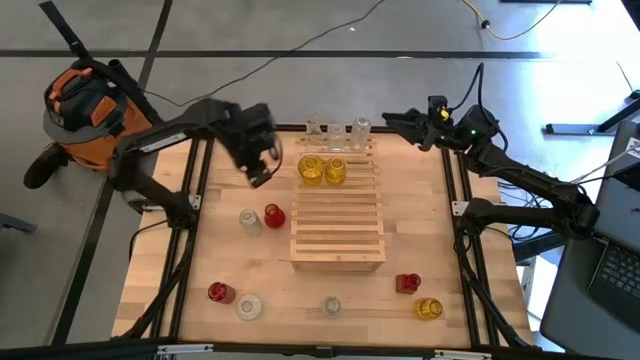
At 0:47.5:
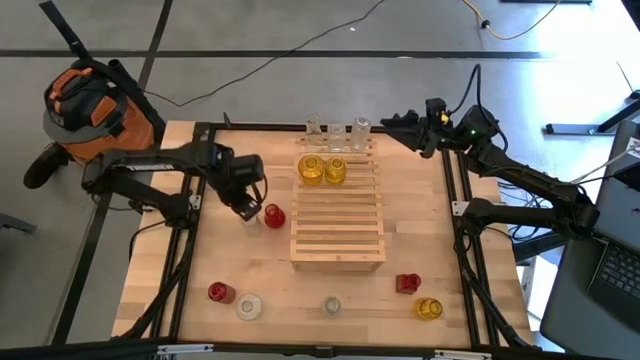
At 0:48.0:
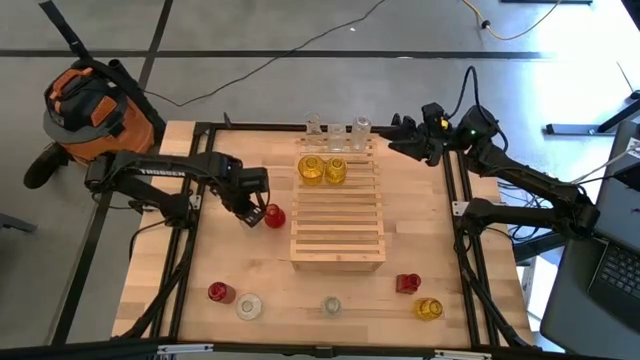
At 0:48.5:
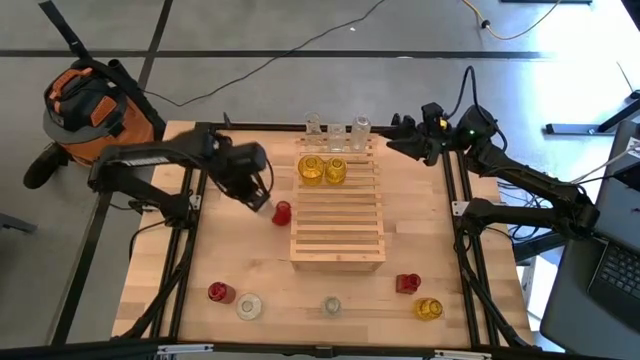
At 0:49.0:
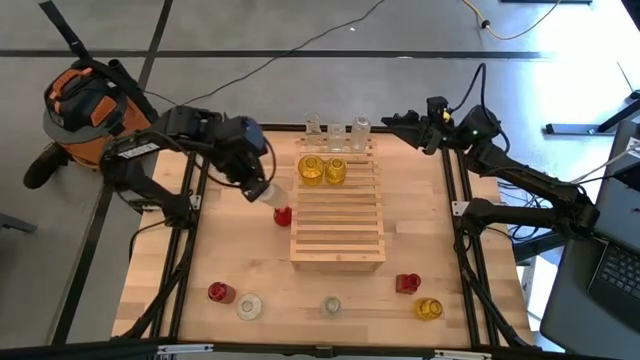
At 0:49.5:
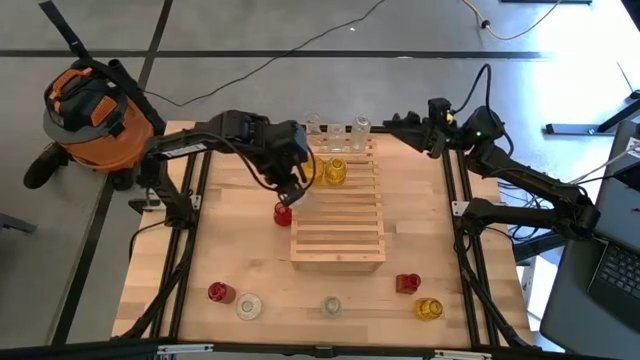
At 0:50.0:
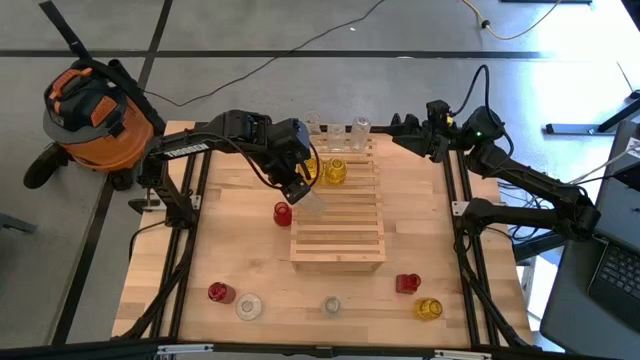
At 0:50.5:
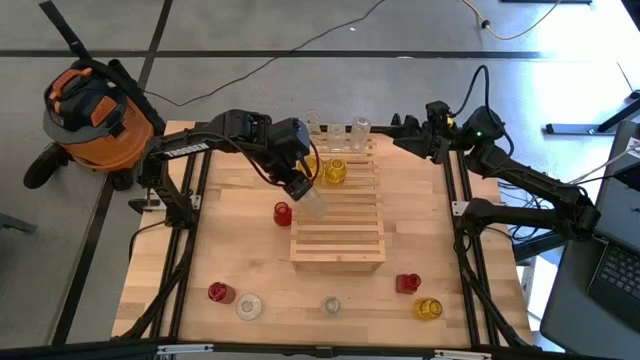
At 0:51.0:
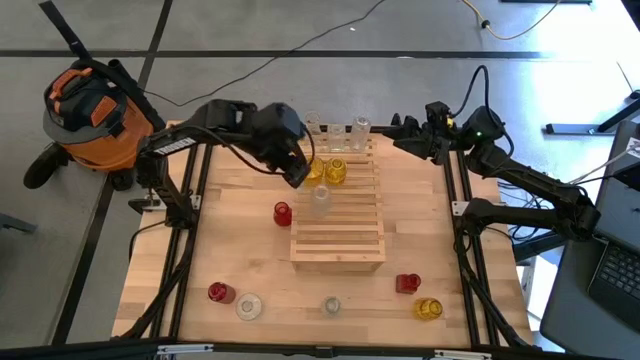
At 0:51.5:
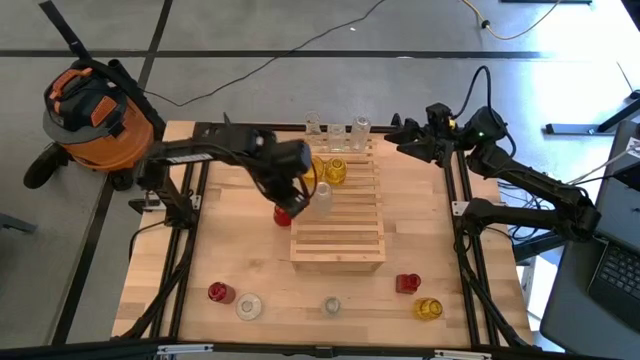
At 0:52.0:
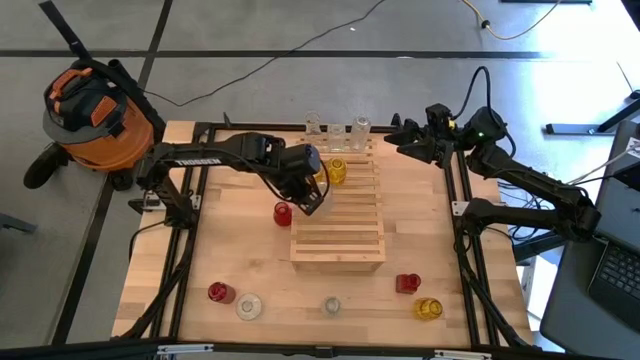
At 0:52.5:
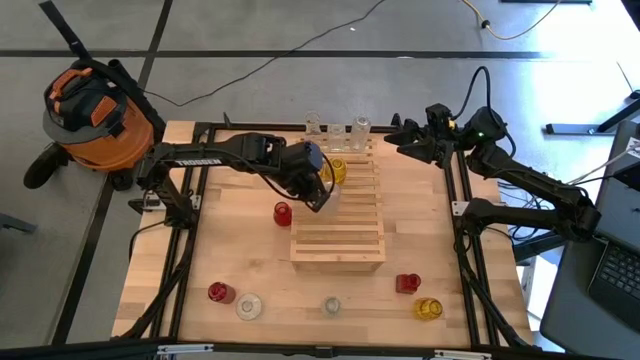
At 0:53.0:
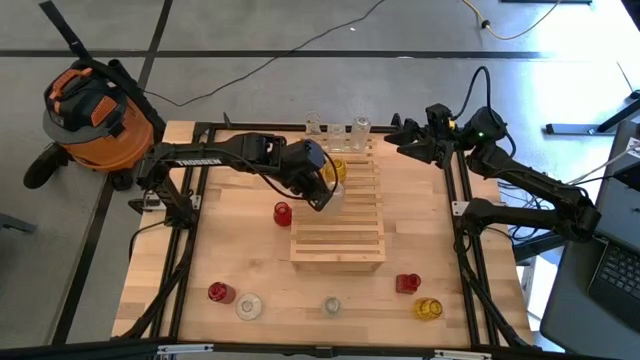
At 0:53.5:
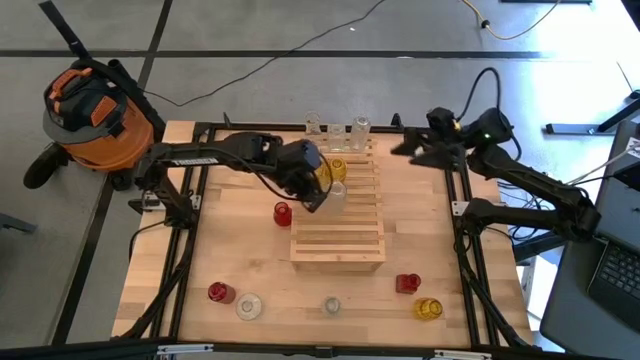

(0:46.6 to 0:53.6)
Task: sort vases onto shelf
Put the transparent vase on the shelf

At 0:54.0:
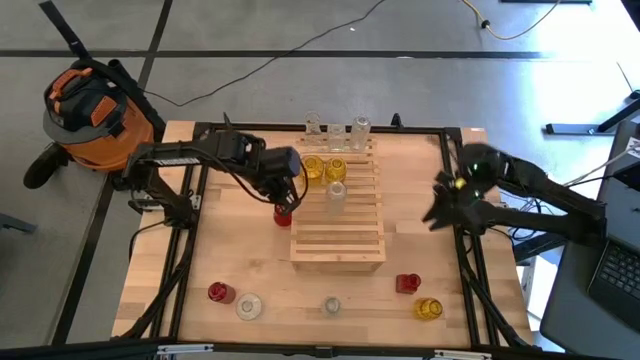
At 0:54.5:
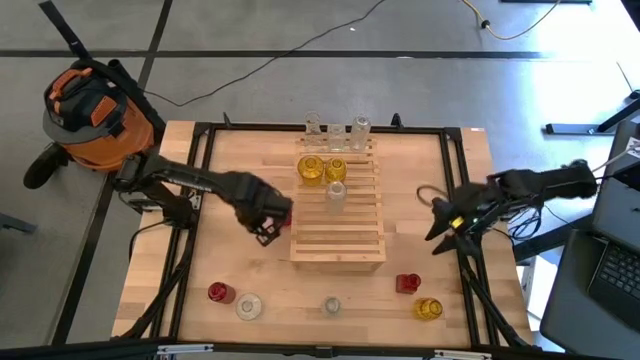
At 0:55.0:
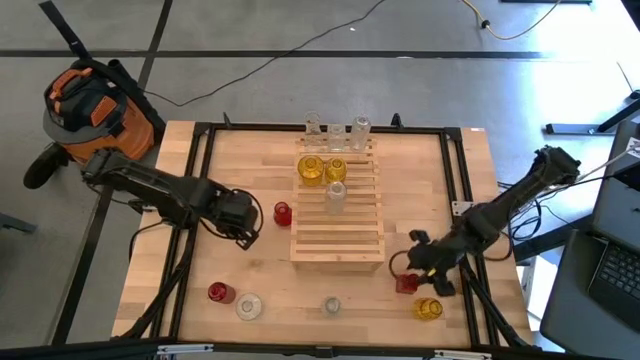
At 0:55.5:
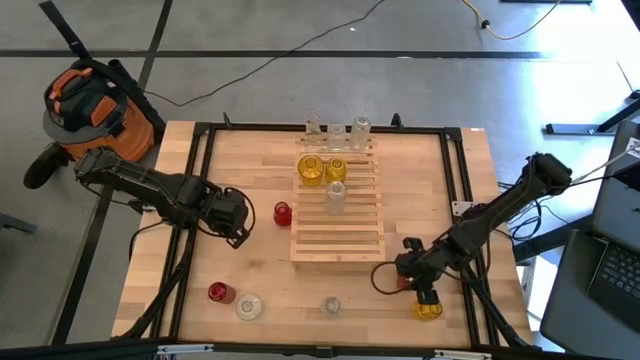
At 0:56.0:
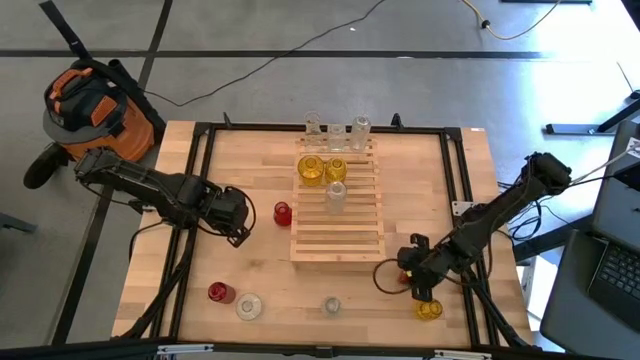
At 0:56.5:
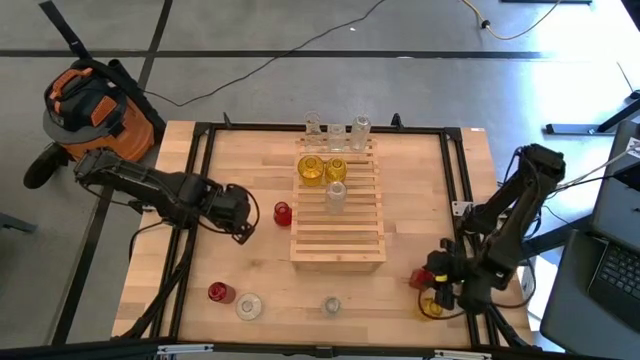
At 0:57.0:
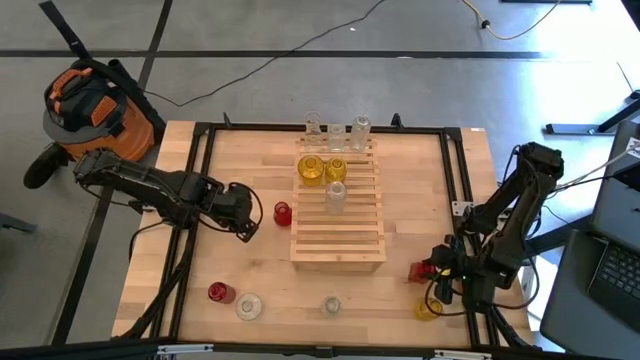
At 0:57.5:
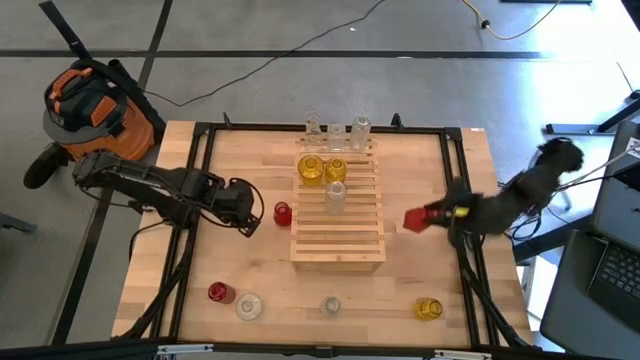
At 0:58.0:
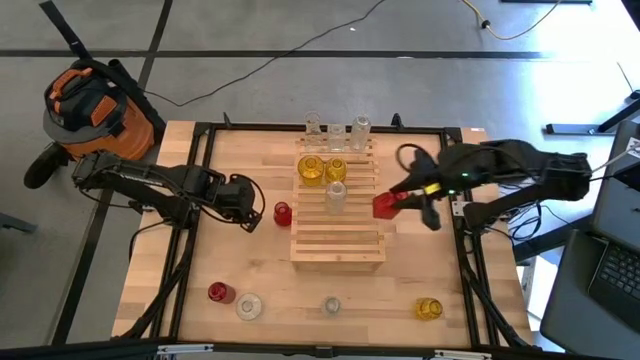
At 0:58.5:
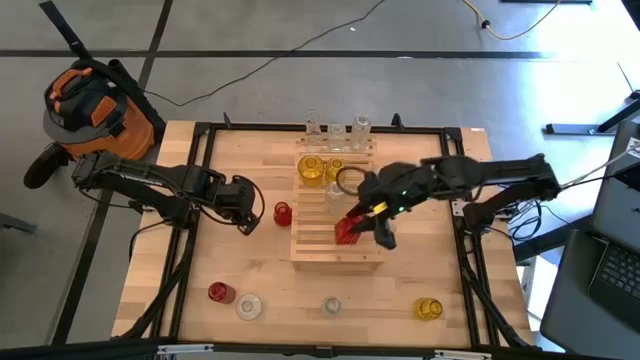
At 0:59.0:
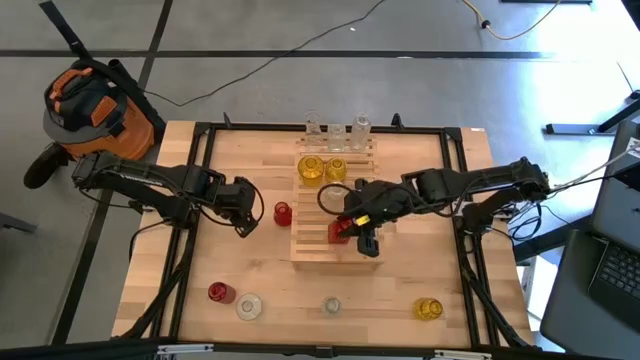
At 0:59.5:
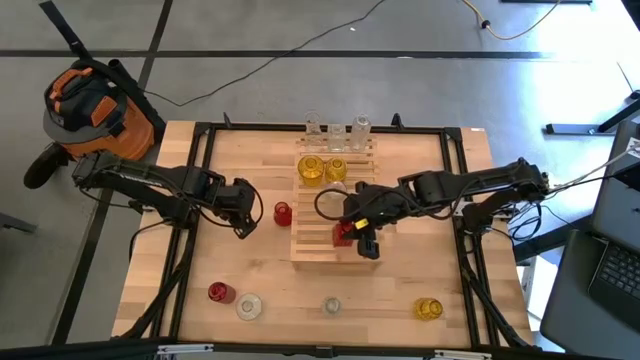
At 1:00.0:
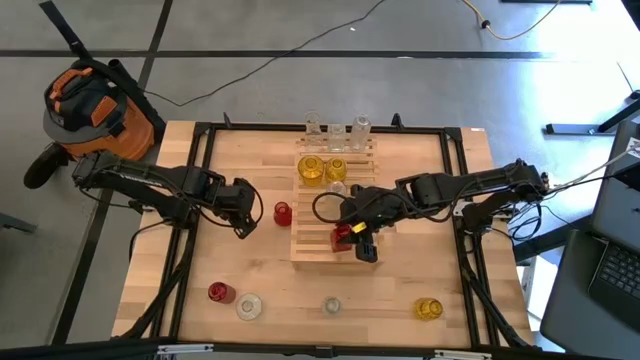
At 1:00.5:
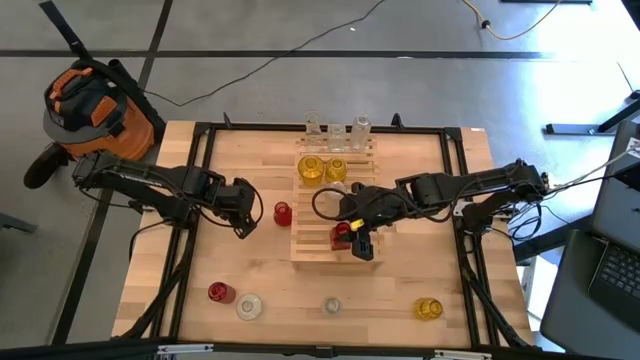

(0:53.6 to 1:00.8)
Put the red vase on the shelf

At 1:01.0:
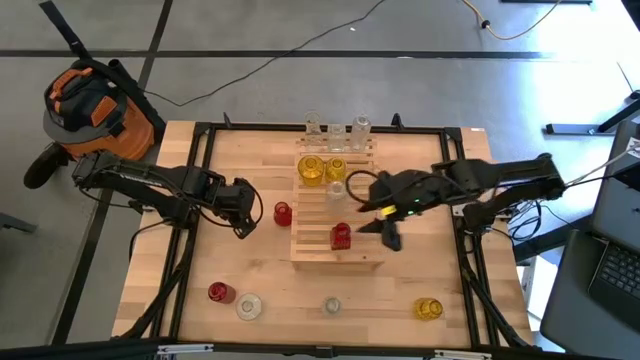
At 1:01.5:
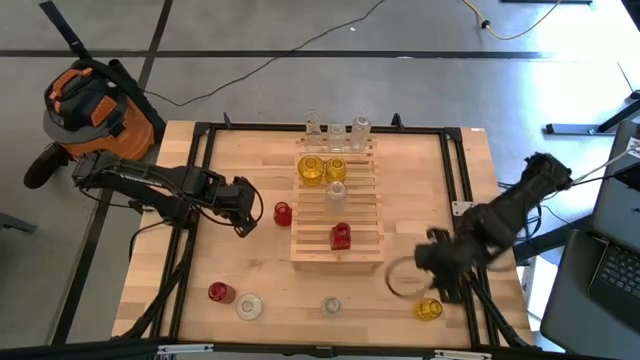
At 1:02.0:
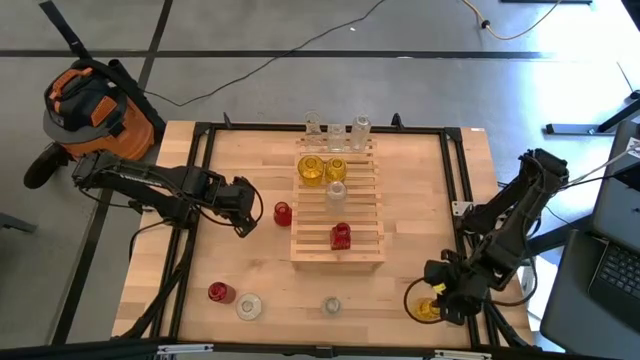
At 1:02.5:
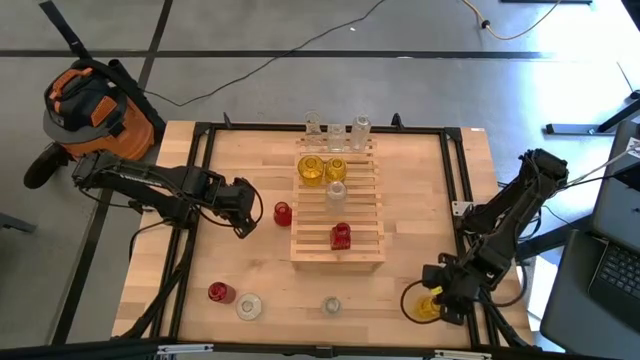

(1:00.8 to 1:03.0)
Align the yellow vase with the yellow vases on the shelf

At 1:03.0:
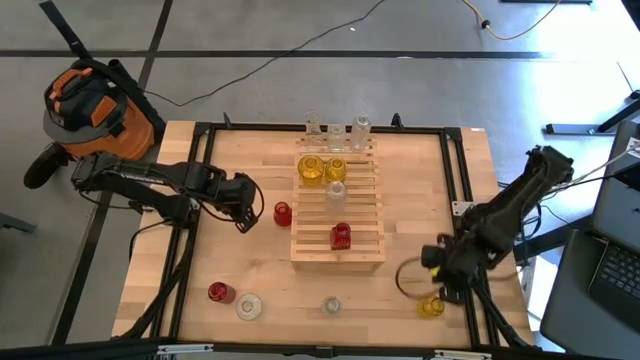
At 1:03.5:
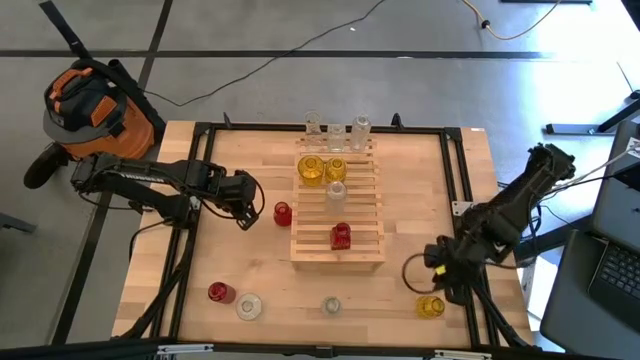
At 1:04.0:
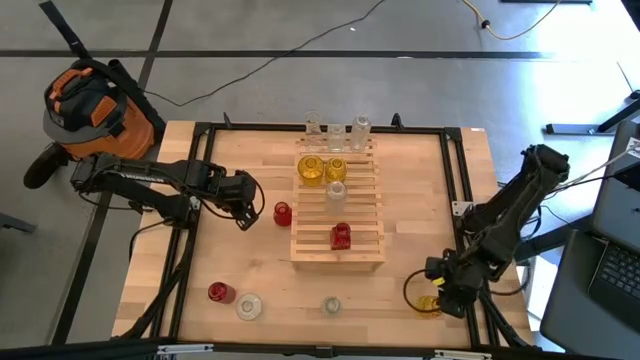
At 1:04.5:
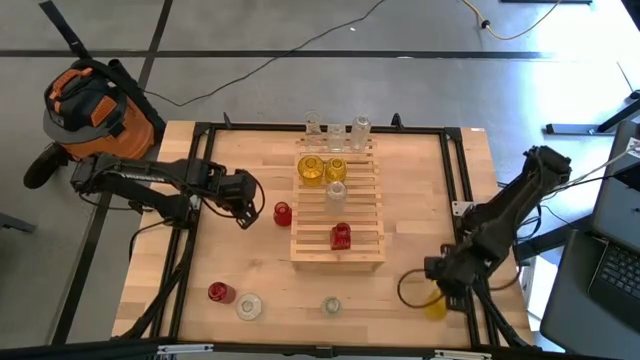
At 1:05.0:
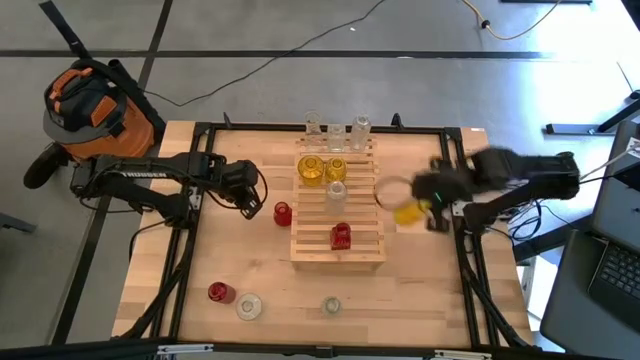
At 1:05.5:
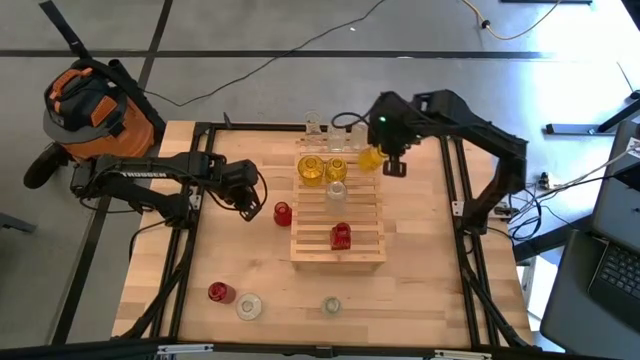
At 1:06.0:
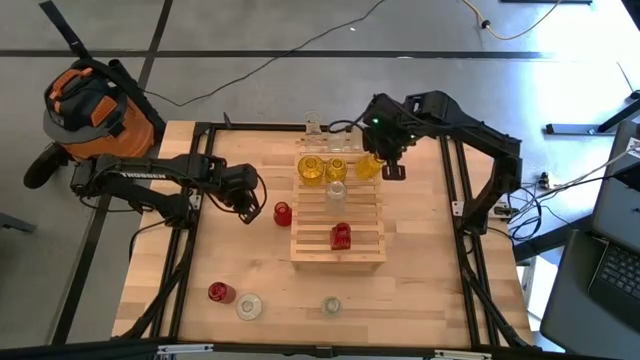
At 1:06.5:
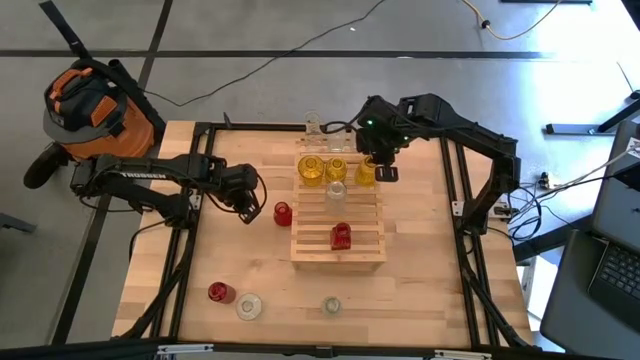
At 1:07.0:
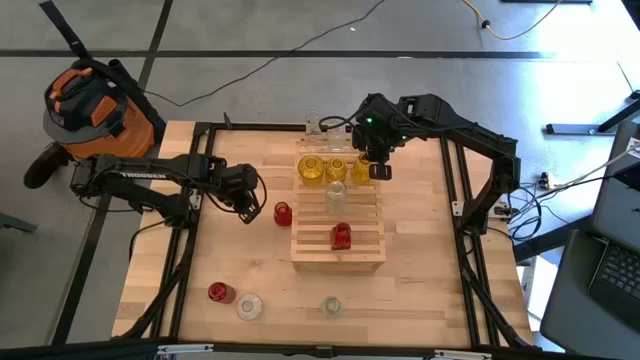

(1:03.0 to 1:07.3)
Align the yellow vase with the yellow vases on the shelf
